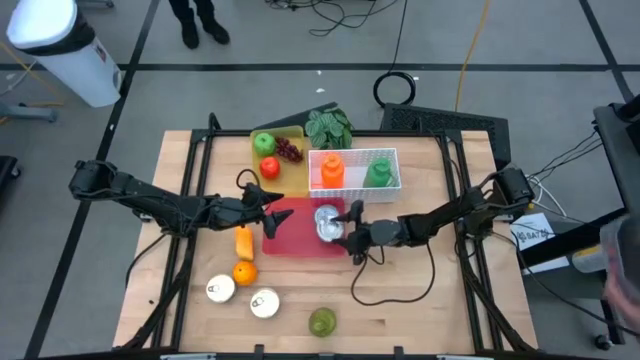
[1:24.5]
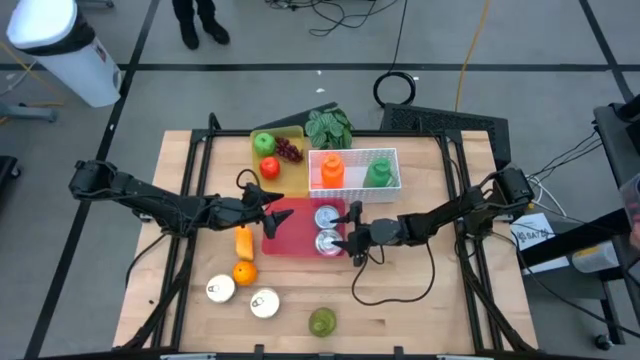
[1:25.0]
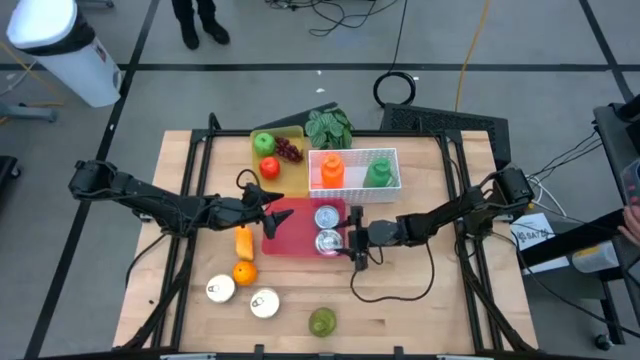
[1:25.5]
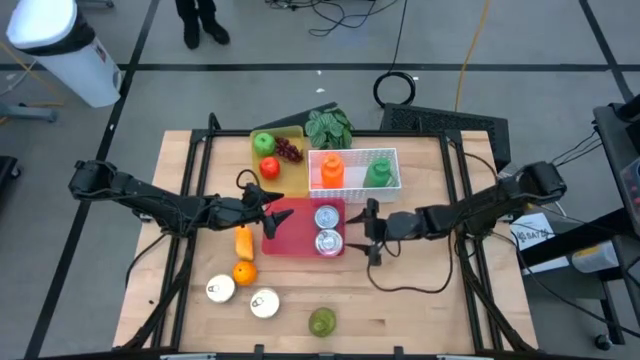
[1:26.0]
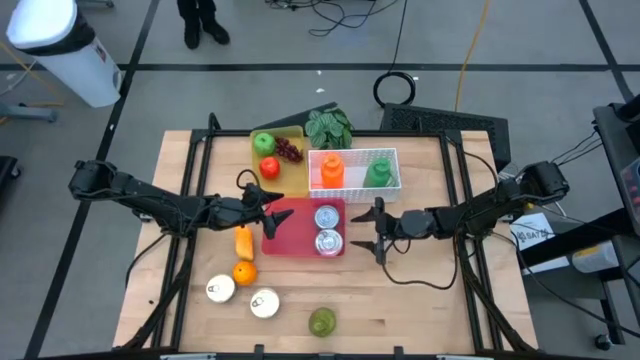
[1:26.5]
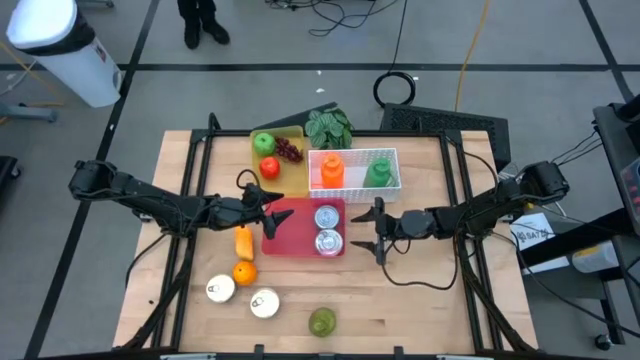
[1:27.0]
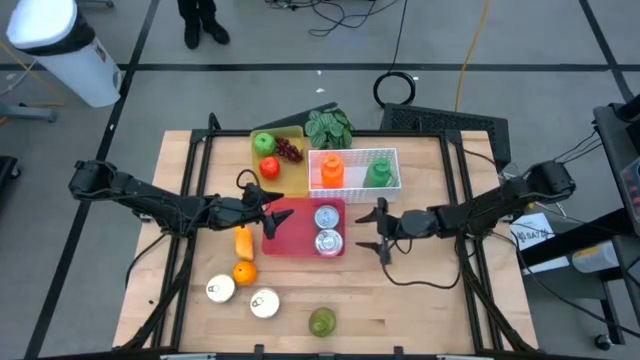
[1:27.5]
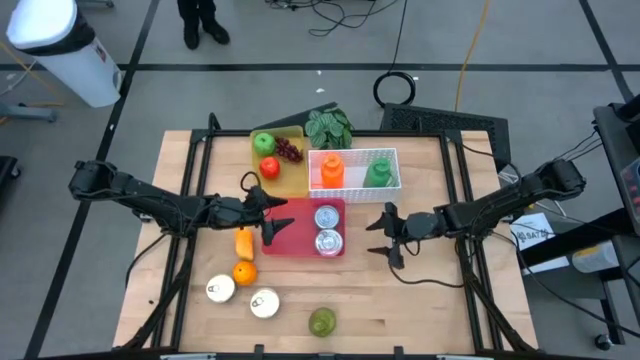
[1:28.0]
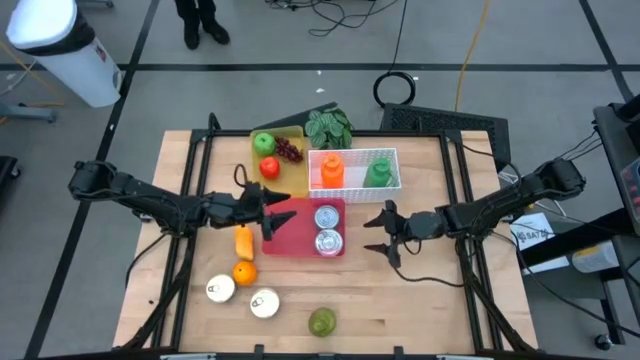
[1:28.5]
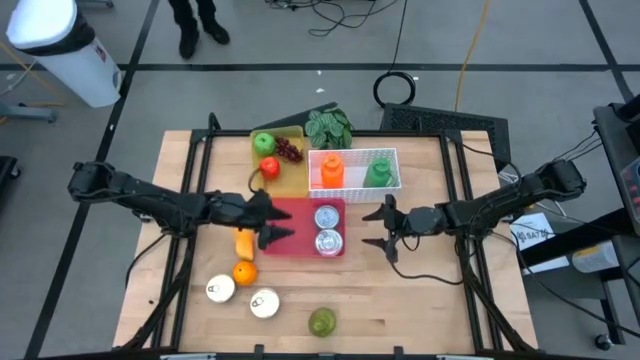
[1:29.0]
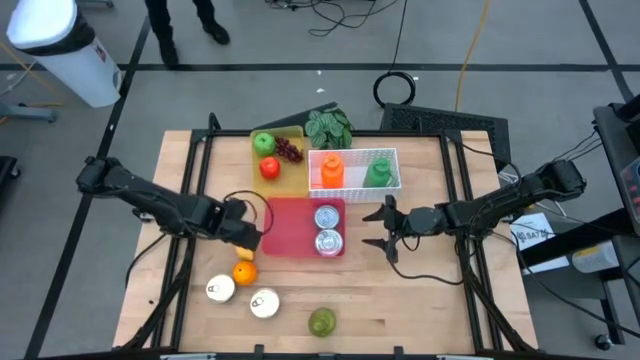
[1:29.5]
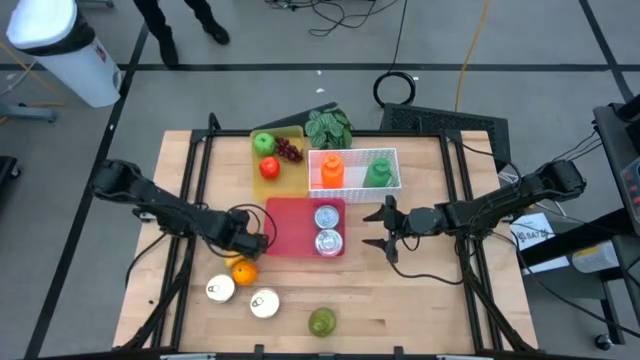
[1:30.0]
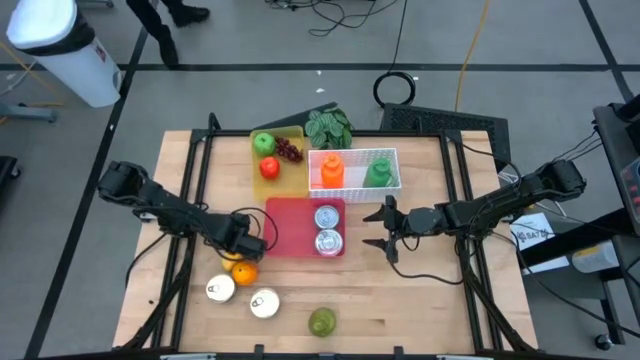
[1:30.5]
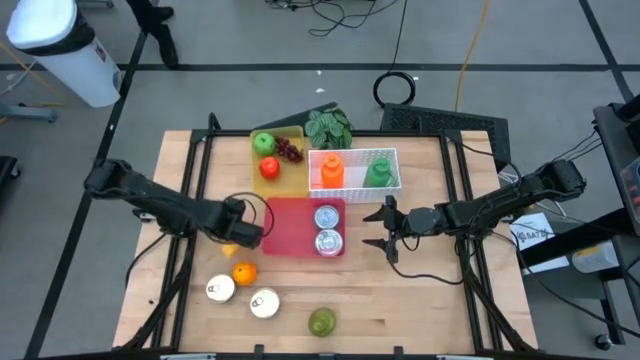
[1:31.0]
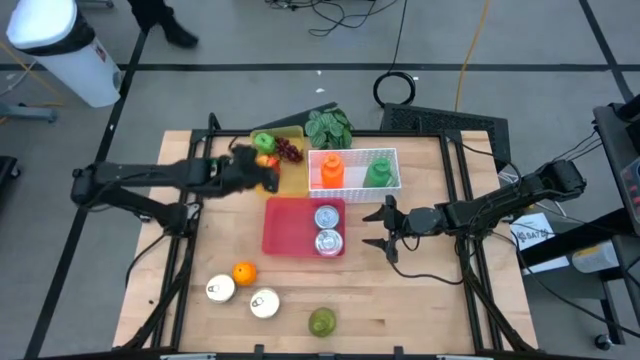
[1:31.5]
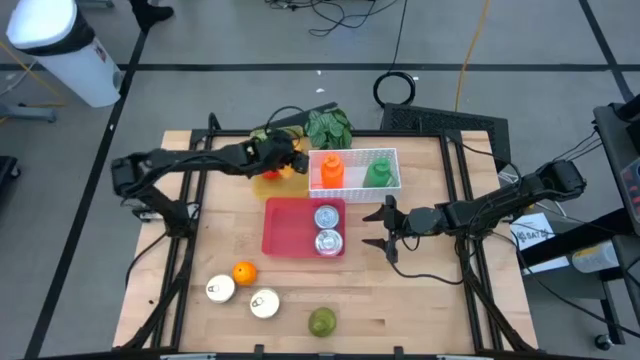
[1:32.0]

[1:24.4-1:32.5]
Task: Pick & Place Food Item
Put the mango in the yellow bin

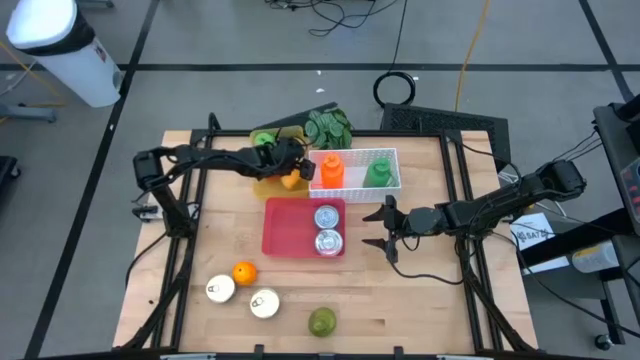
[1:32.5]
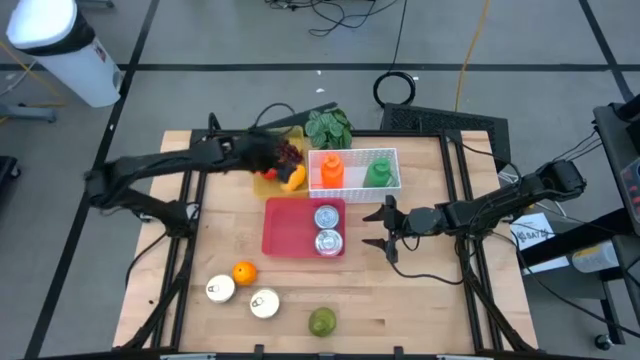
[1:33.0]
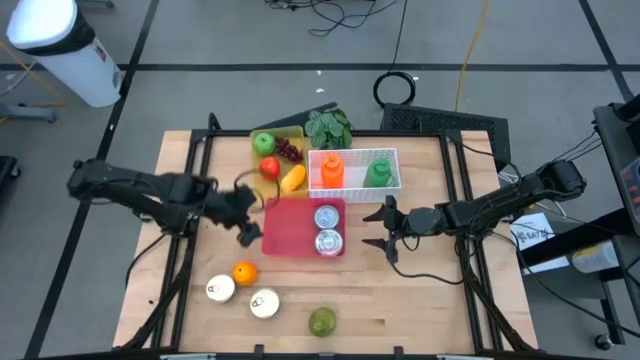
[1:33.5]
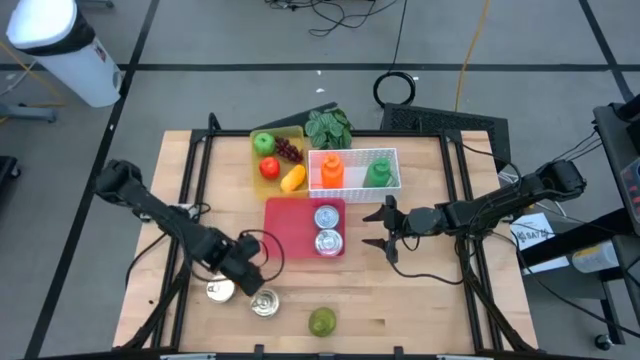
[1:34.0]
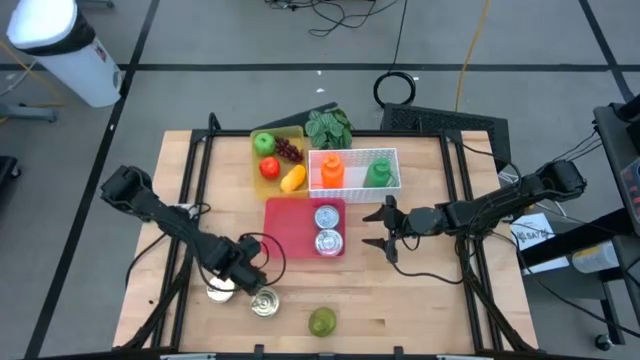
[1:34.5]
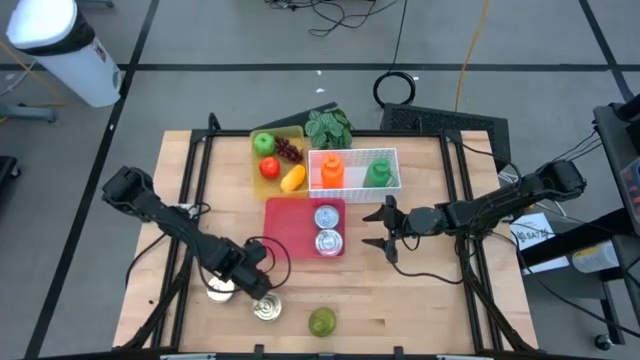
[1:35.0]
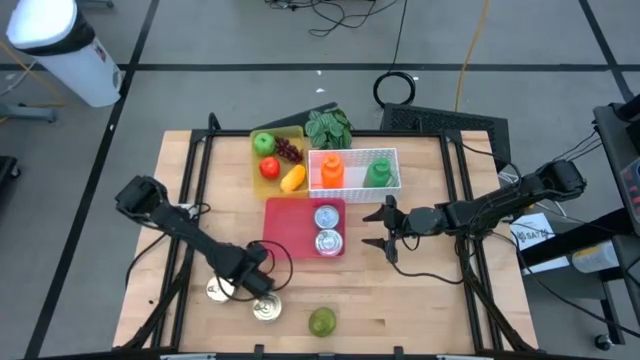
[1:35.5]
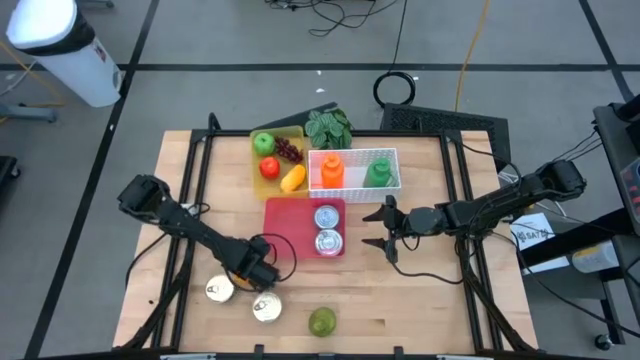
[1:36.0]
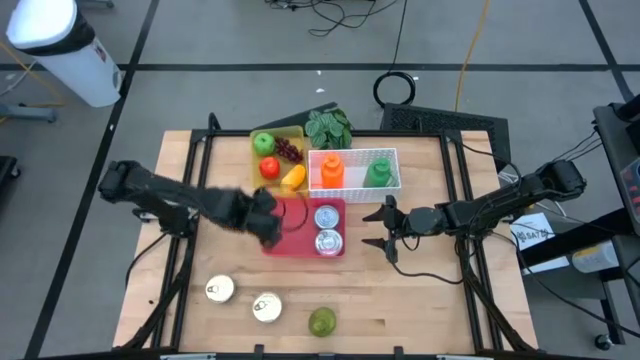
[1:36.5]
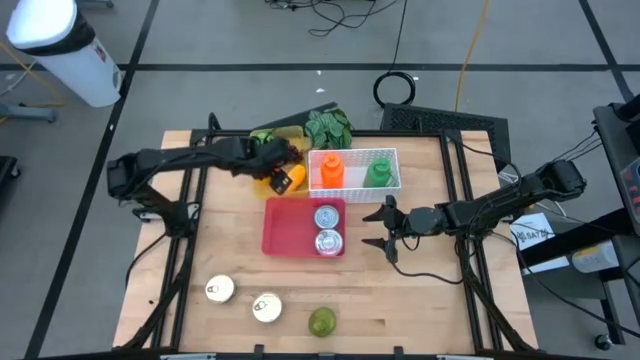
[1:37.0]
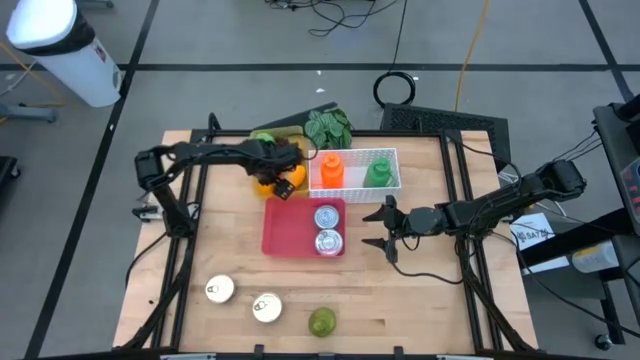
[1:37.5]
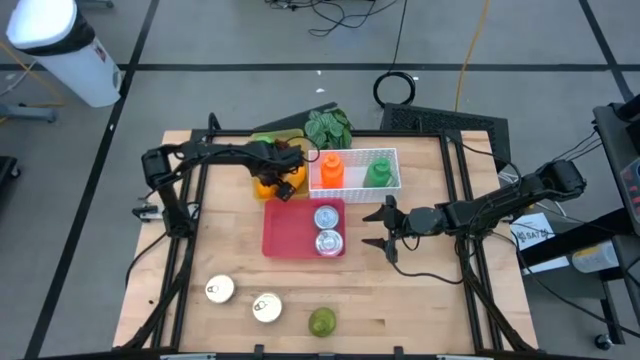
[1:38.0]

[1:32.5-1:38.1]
Put the orange in the yellow bin

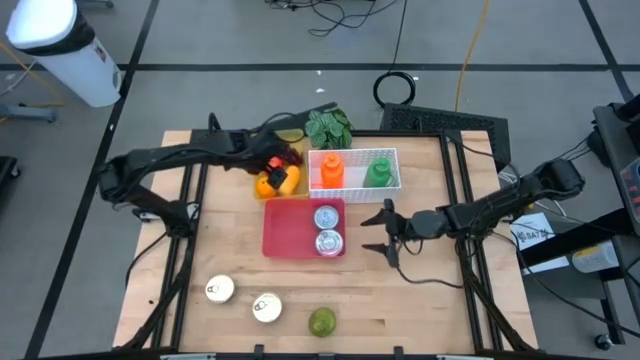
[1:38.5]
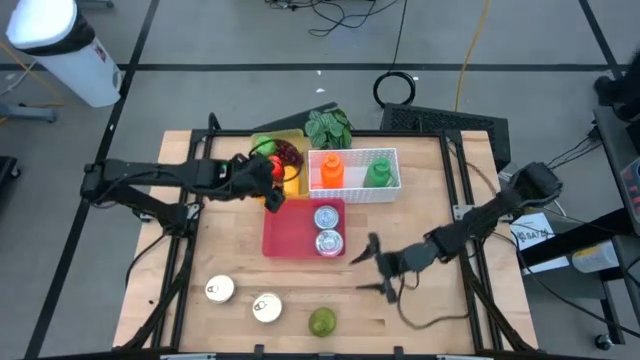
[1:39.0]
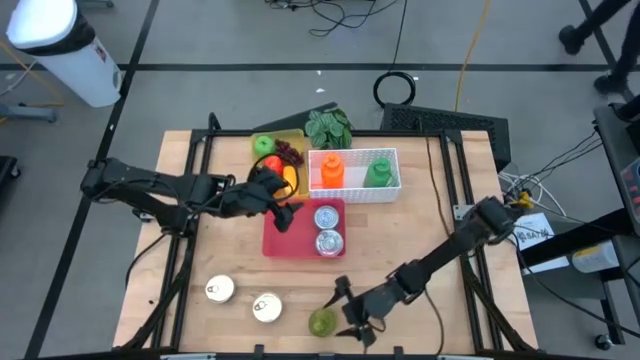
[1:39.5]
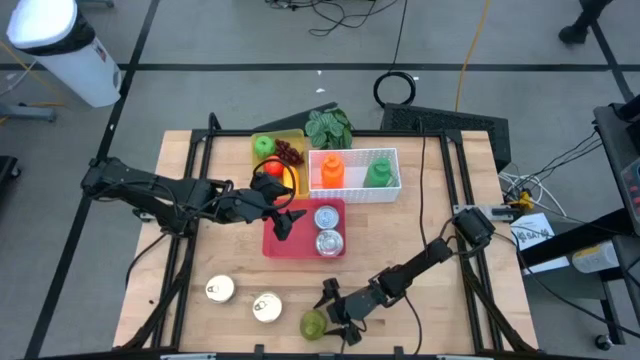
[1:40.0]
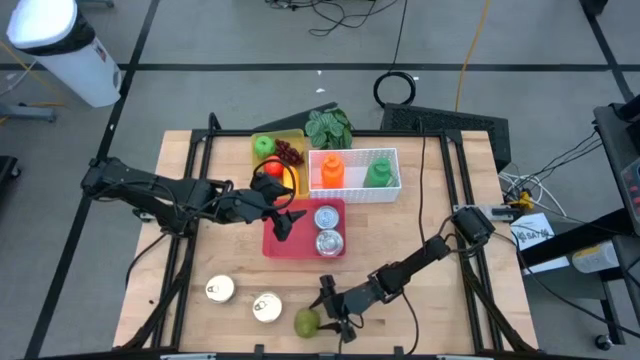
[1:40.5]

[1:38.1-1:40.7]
Put the green pear in the yellow bin

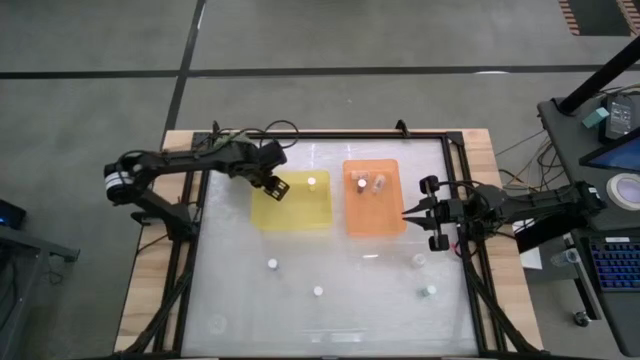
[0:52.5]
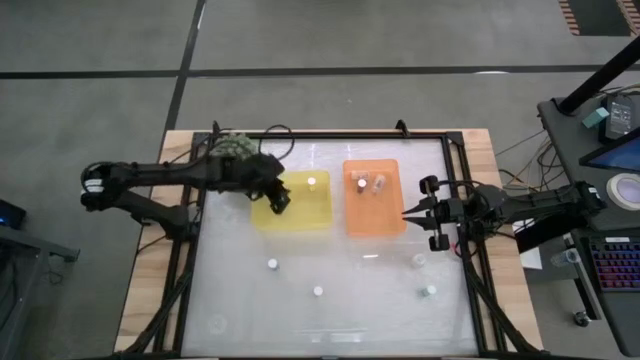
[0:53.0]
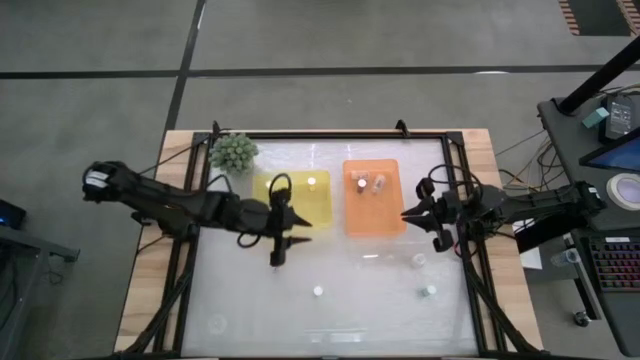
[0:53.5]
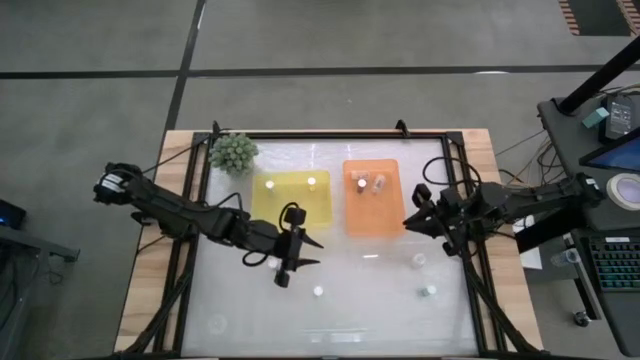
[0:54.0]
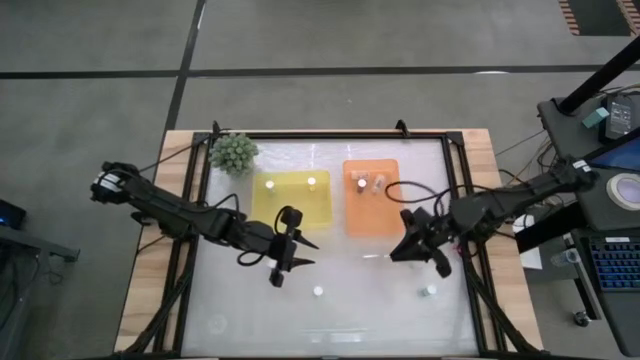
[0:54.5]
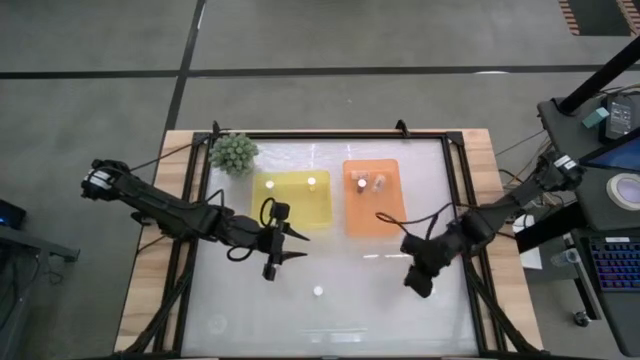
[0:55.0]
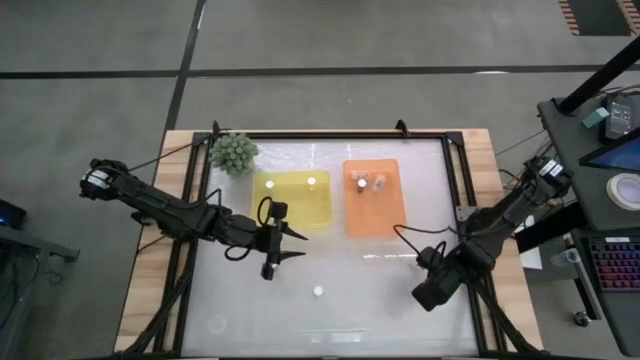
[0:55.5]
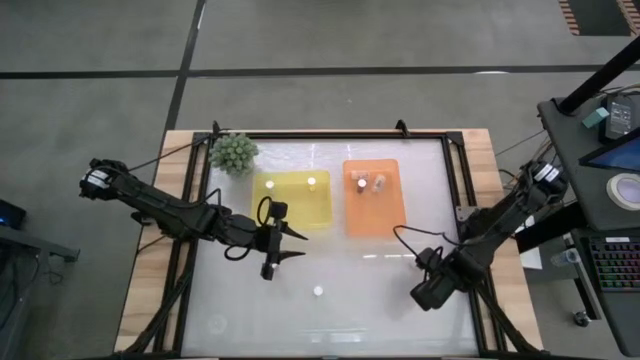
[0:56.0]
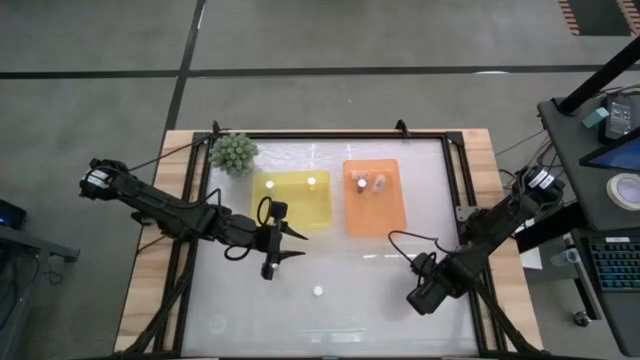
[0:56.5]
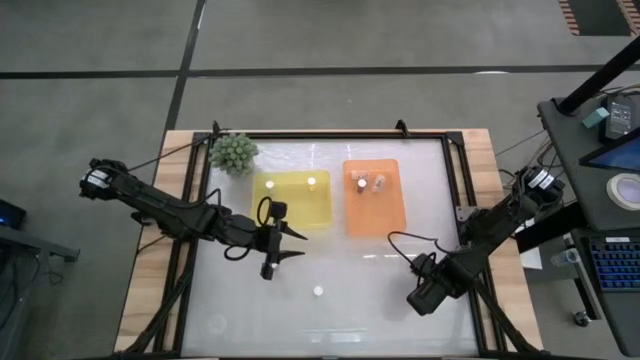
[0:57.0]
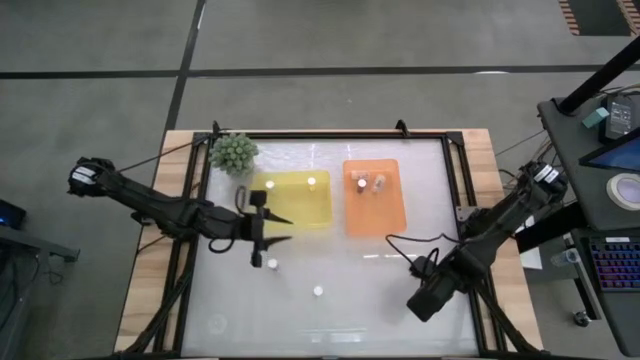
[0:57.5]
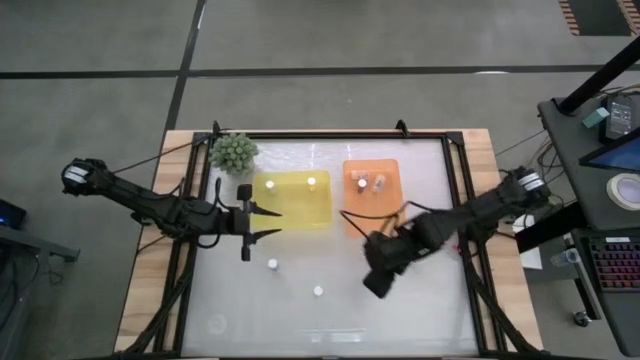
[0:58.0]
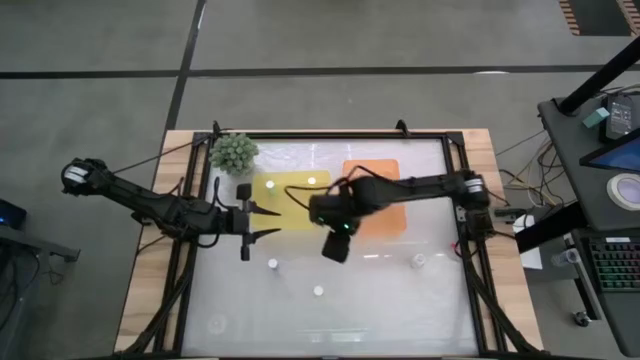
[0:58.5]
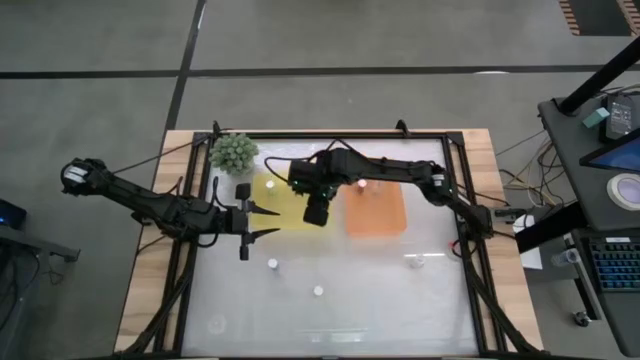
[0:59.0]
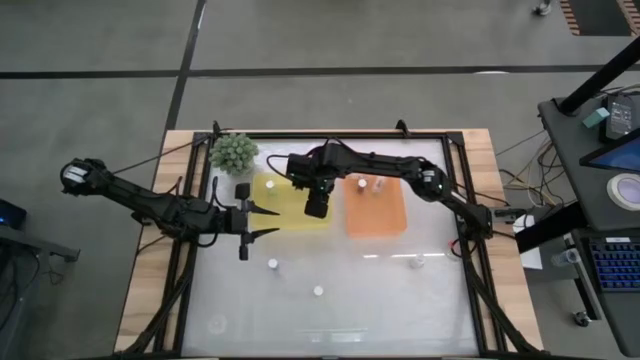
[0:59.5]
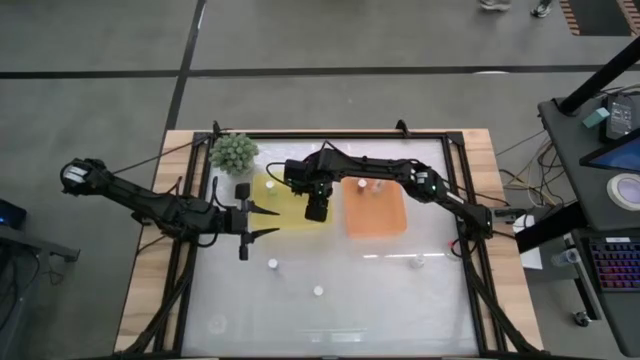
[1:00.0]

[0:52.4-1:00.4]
Task: Pick and place medicine bottles into bin by pill shape (circle, oval)
Put the green pill bottle into the yellow bin
